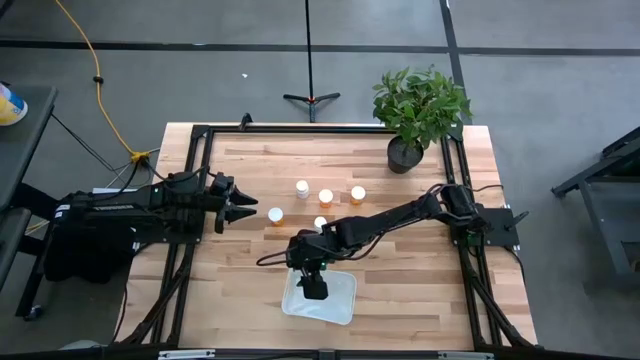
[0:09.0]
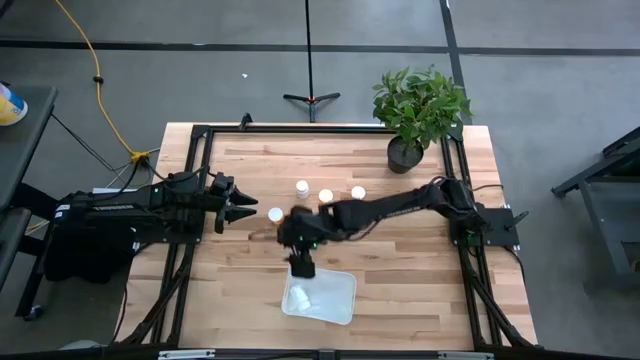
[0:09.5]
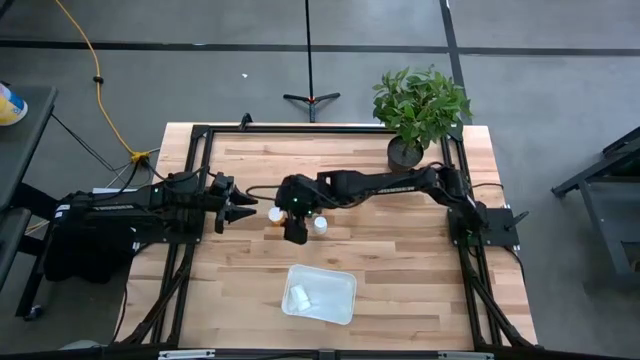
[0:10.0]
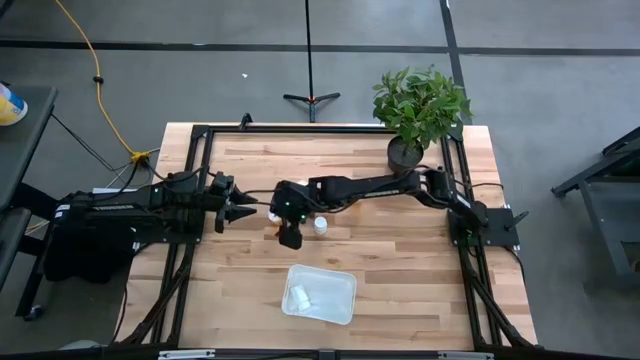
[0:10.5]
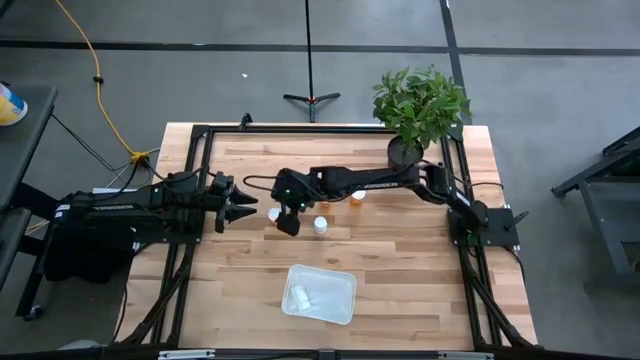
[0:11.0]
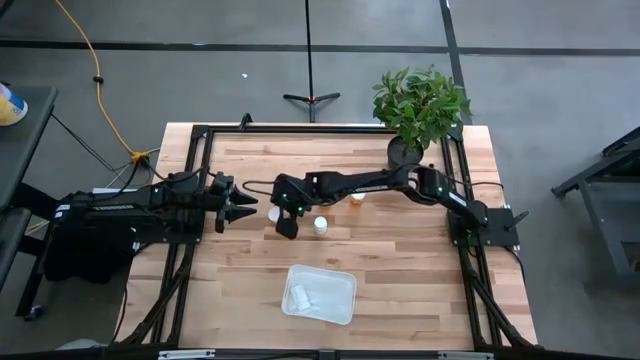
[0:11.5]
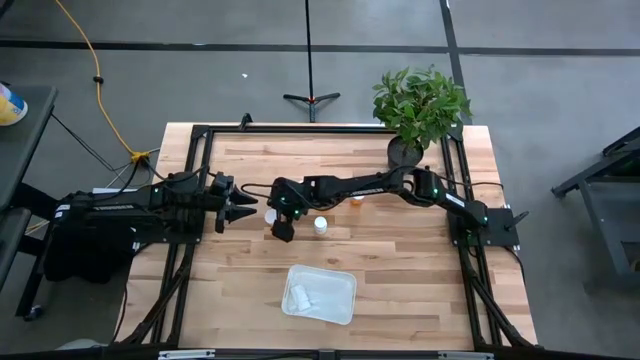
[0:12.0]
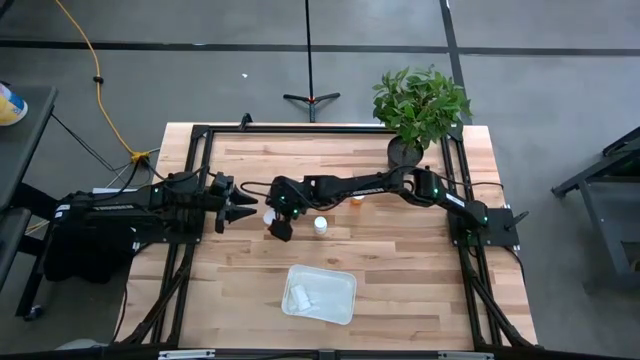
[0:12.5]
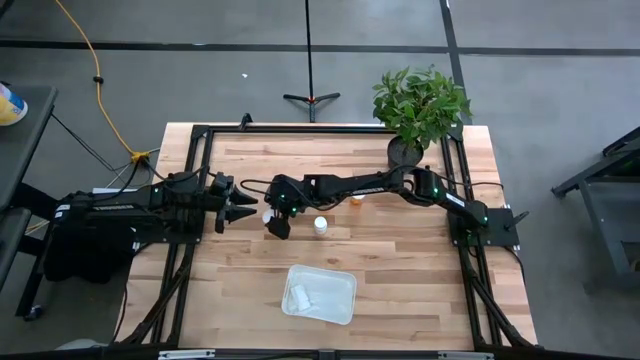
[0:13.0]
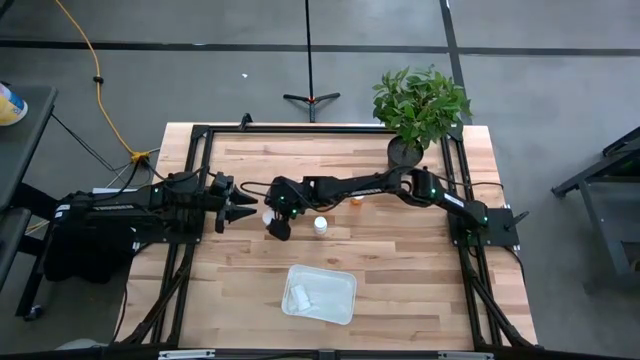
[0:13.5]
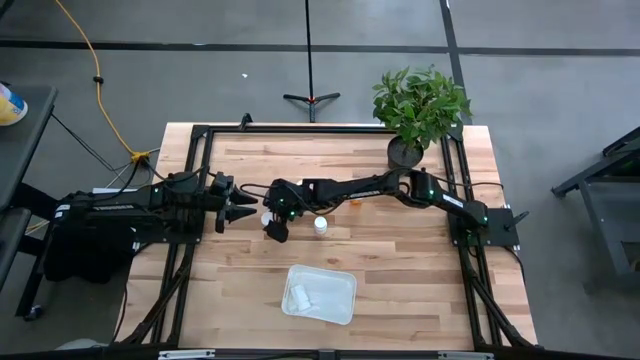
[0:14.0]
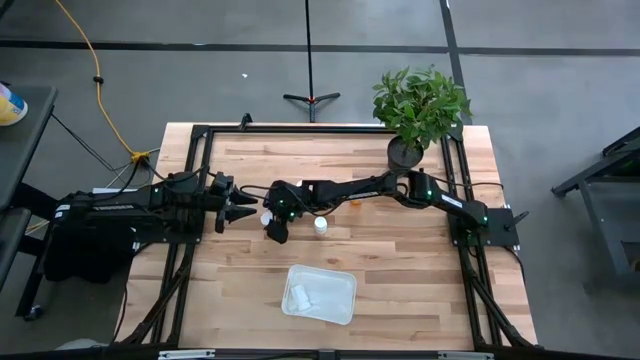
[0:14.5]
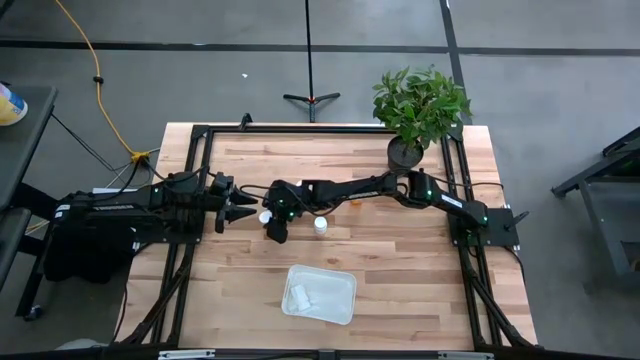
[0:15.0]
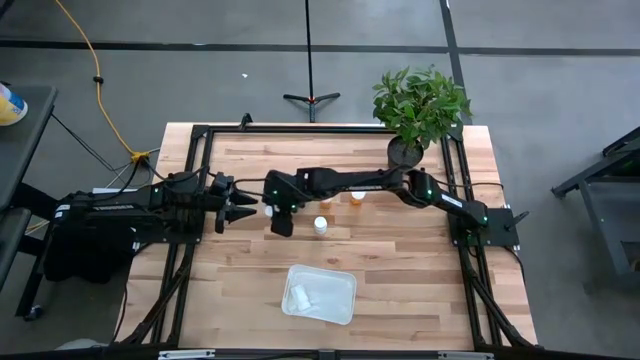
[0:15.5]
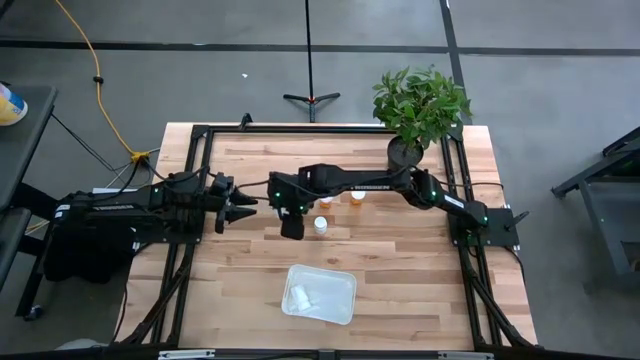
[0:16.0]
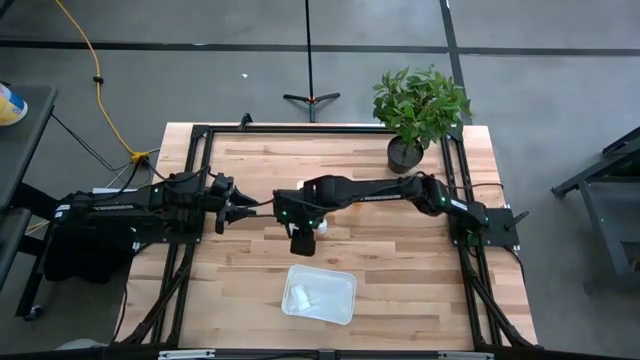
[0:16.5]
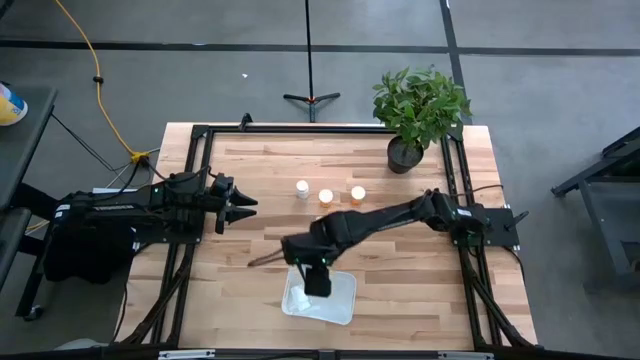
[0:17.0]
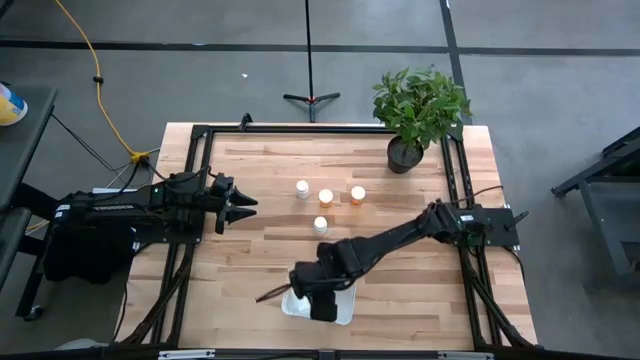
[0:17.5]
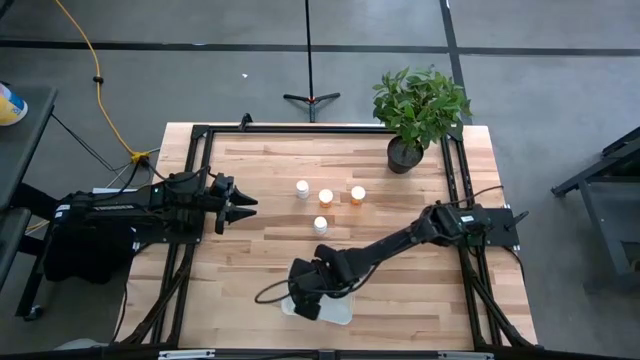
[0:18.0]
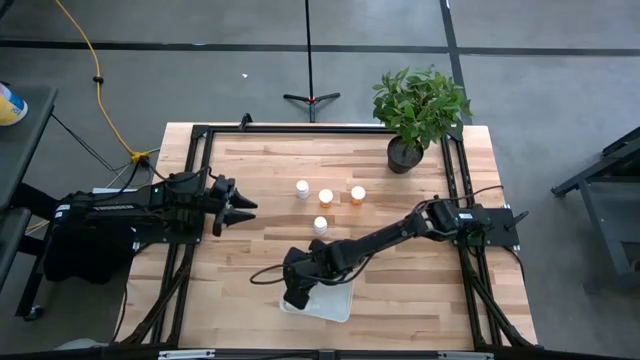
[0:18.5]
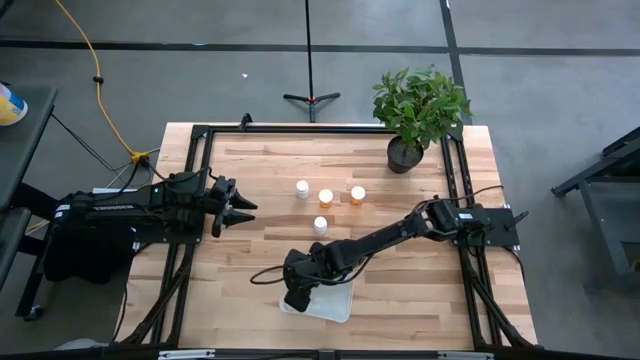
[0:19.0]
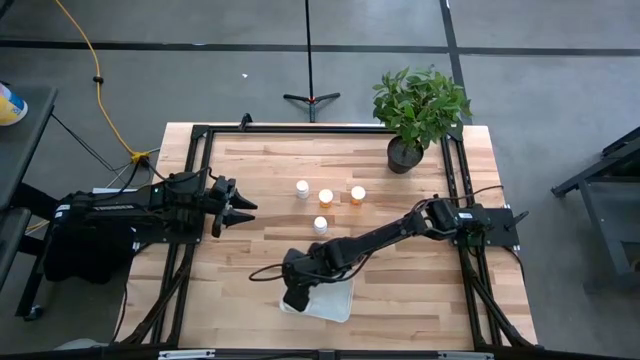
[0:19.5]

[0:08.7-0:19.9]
Task: Pick and place pill bottles into a basket
Put the bottom orange pill bottle into the white bin

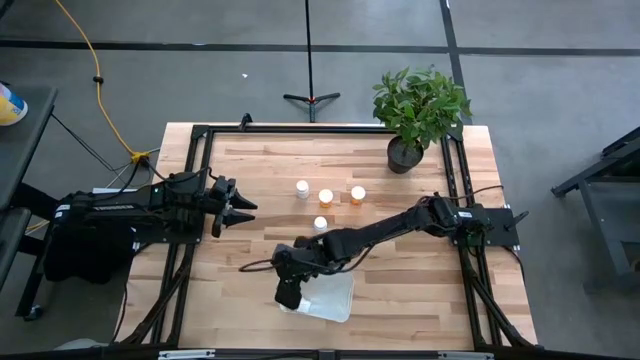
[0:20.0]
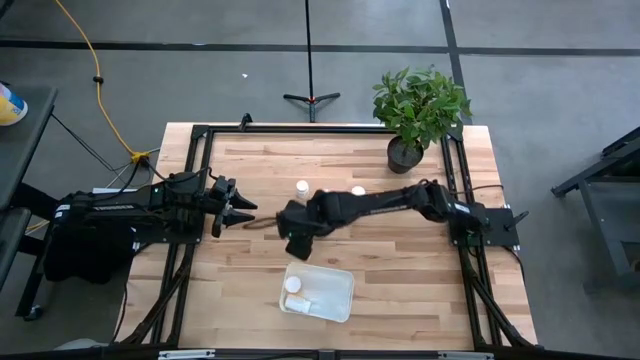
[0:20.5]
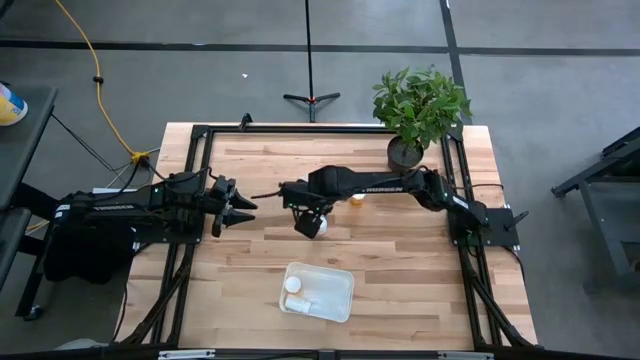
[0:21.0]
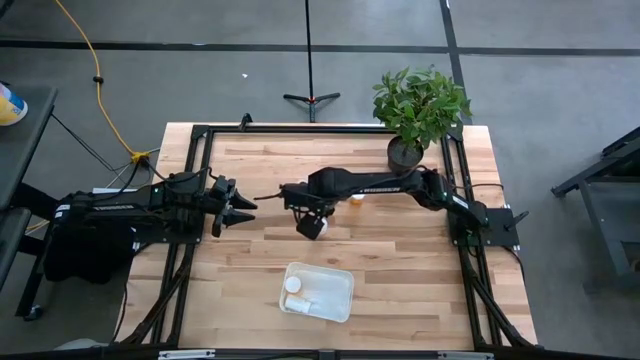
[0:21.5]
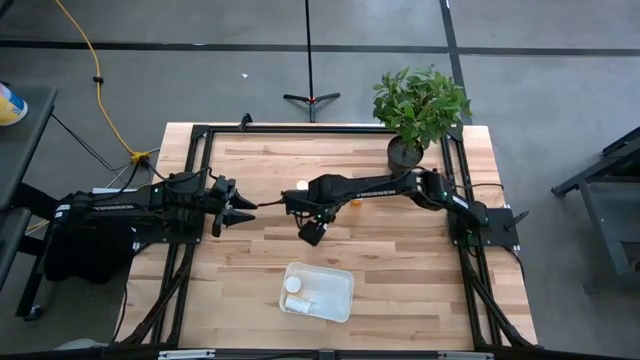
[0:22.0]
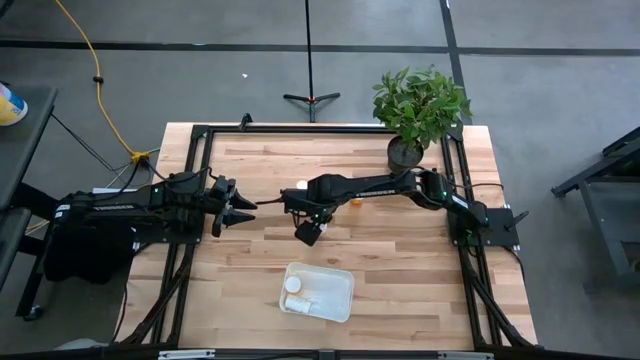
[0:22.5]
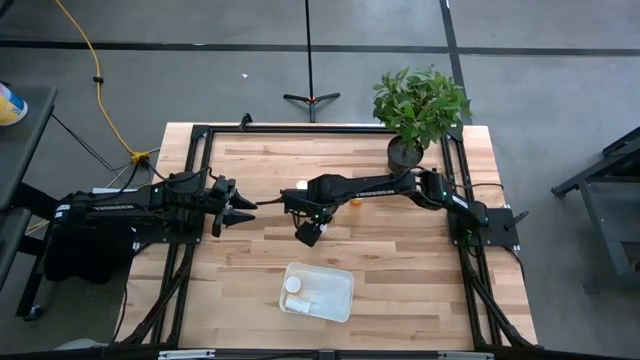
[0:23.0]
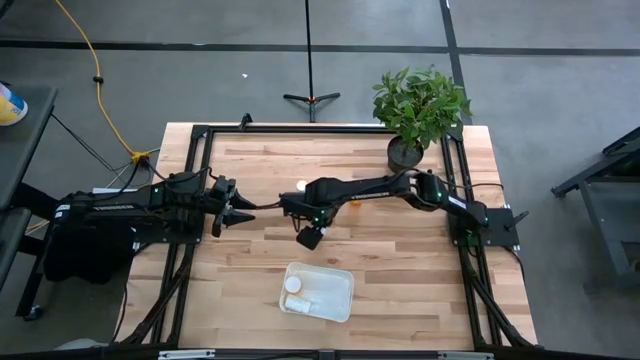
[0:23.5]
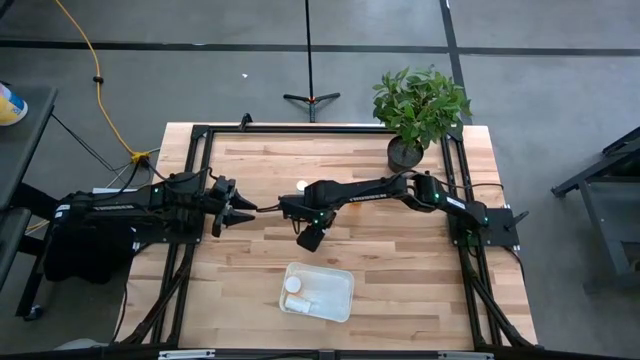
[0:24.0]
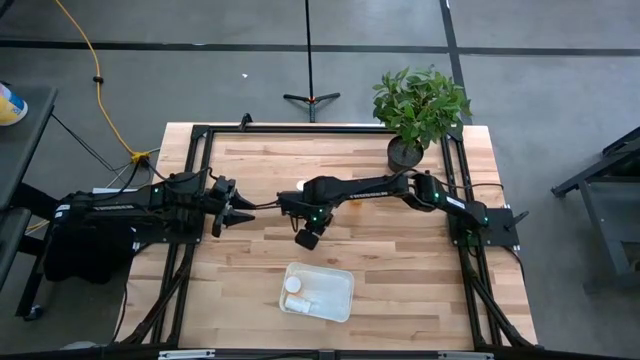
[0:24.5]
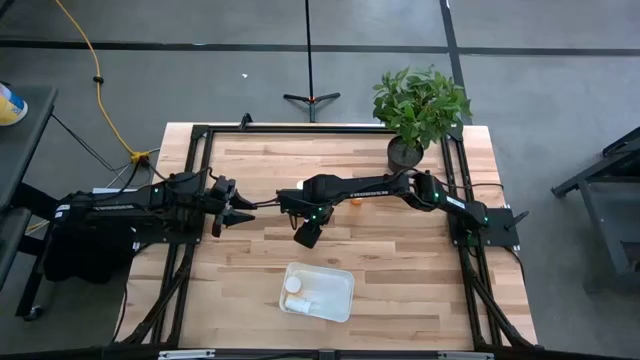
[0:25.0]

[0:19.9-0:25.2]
Put the bottom white pill bottle into the white bin

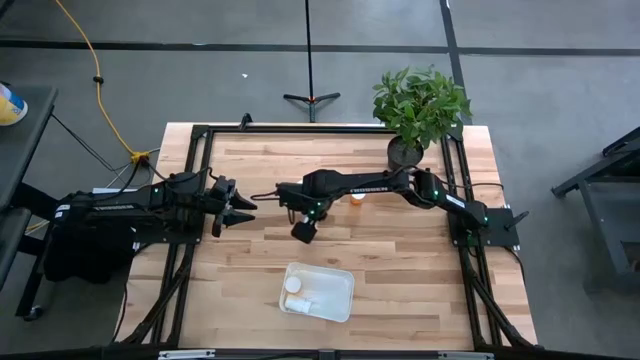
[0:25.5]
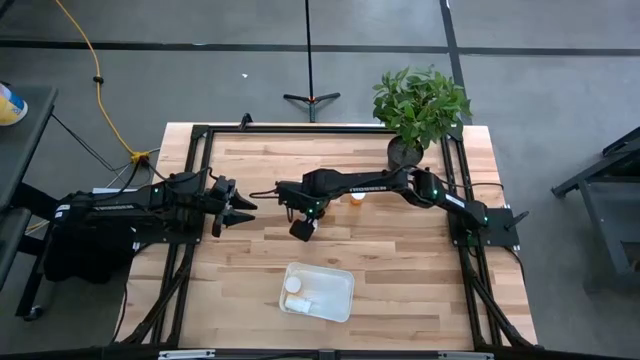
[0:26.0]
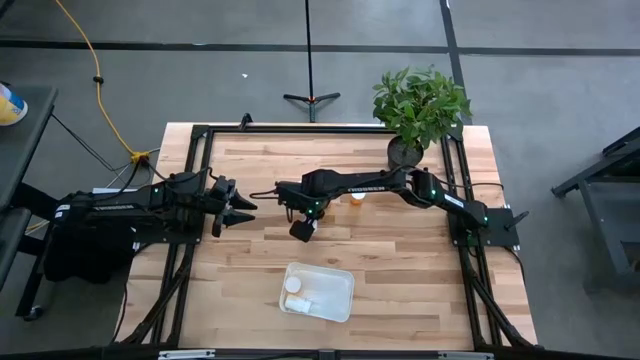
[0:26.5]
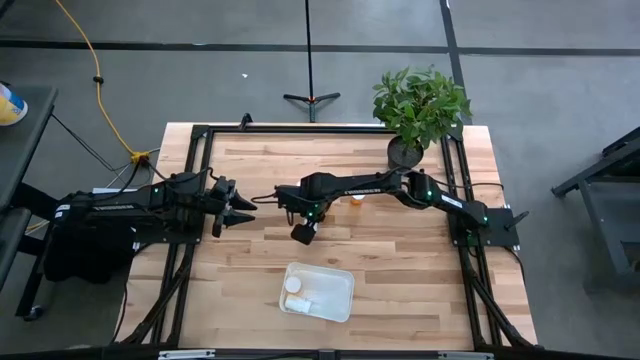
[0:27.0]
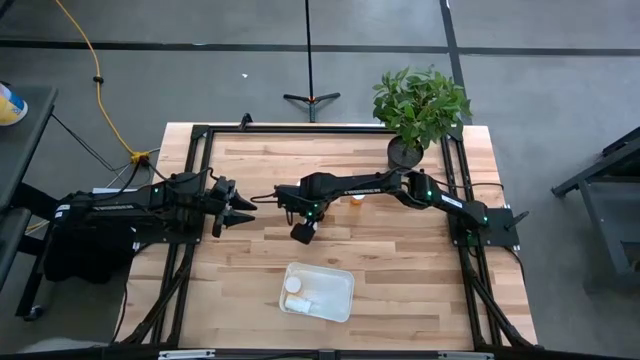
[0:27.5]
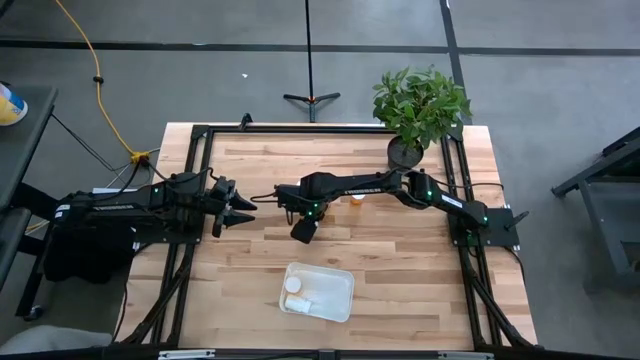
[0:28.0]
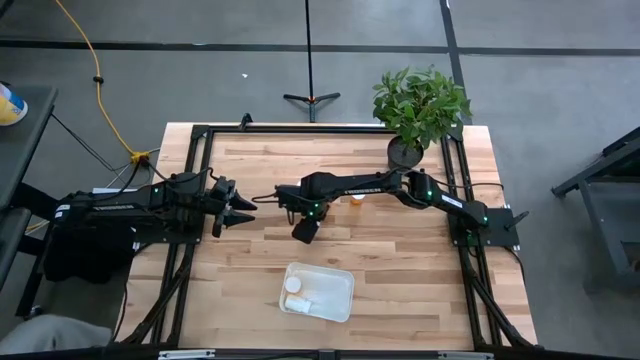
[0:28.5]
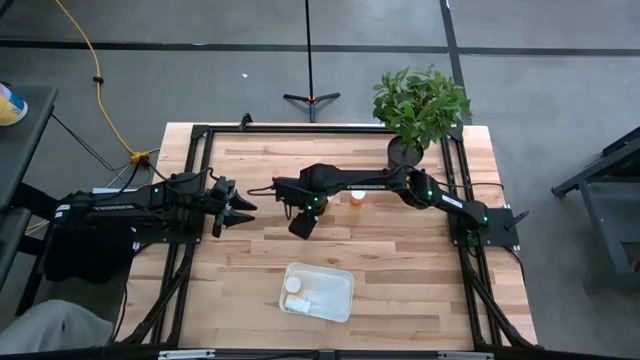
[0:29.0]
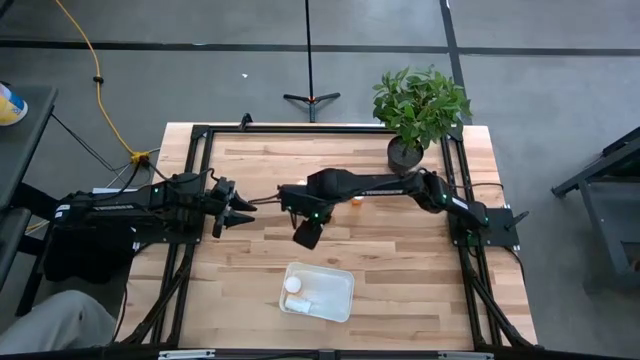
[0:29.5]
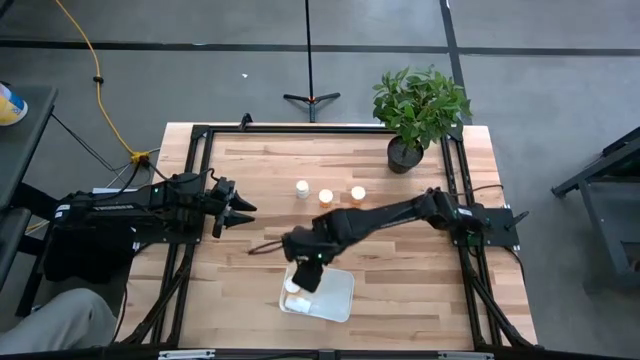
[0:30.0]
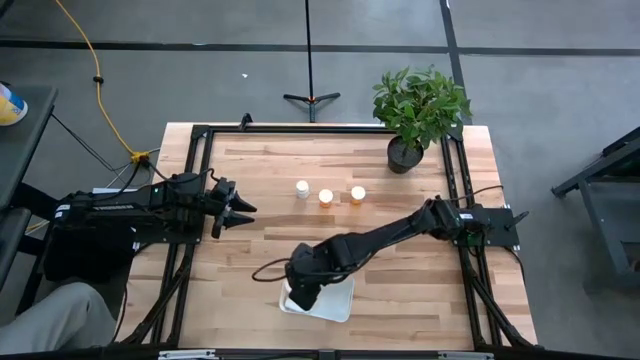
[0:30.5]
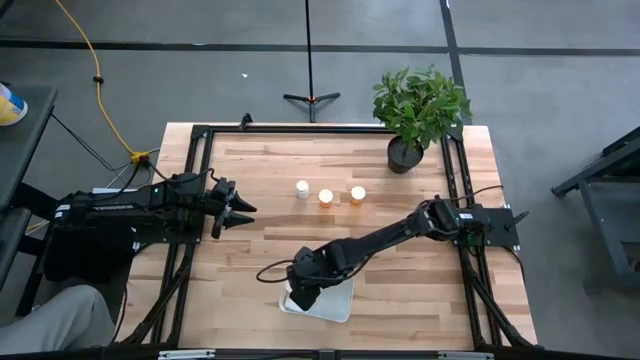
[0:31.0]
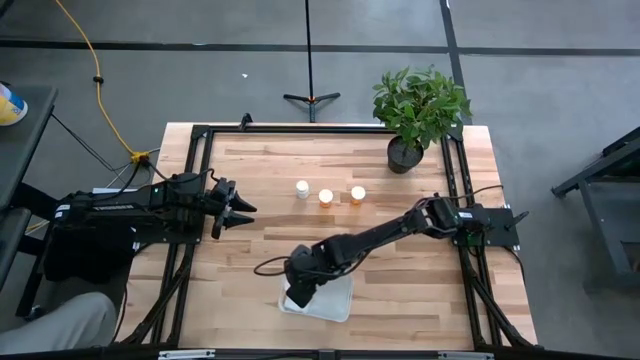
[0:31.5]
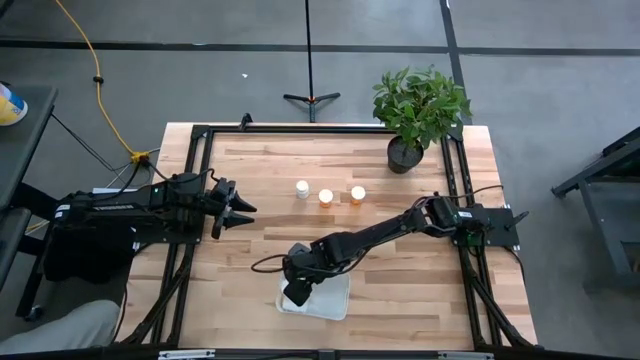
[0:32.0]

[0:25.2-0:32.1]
Put the bottom white pill bottle into the white bin
